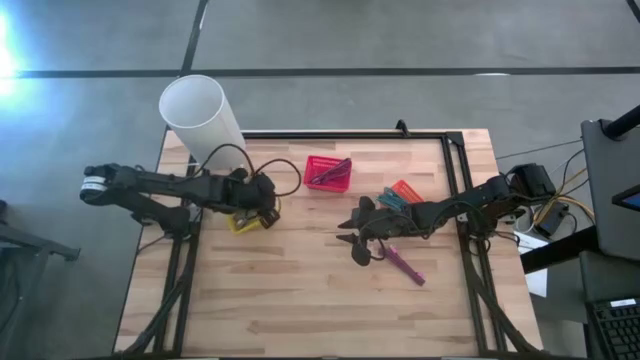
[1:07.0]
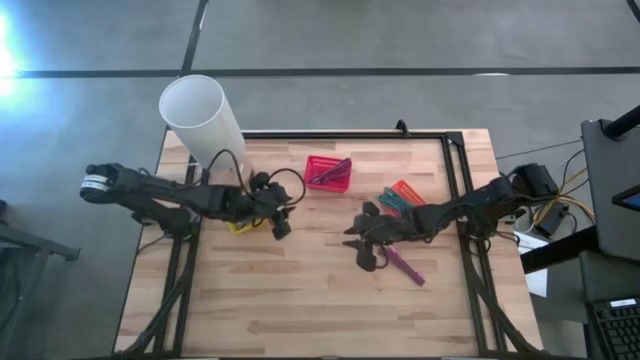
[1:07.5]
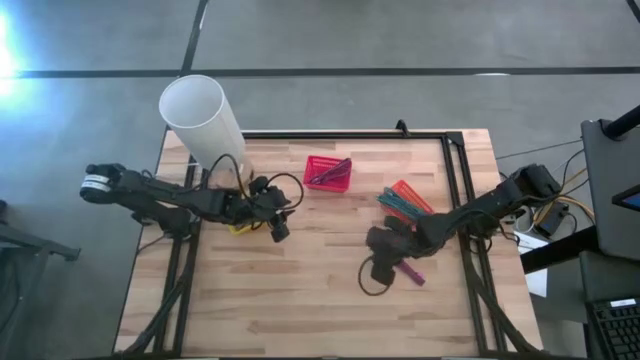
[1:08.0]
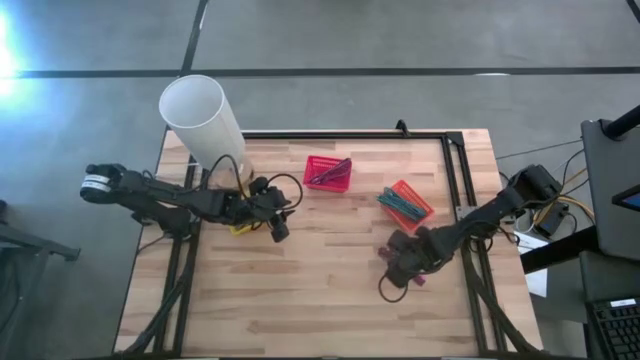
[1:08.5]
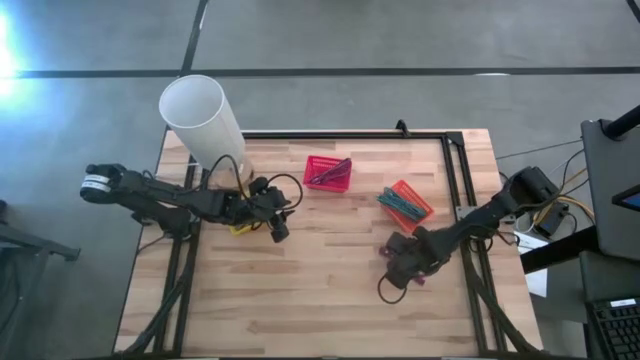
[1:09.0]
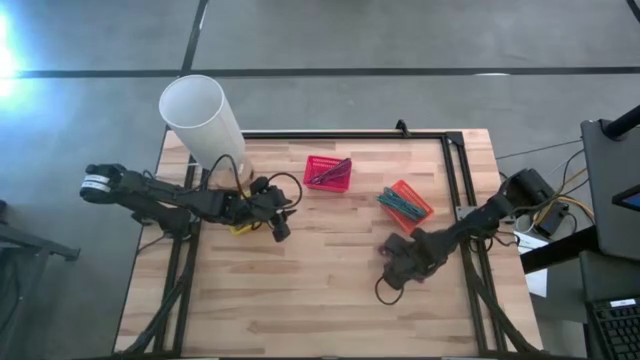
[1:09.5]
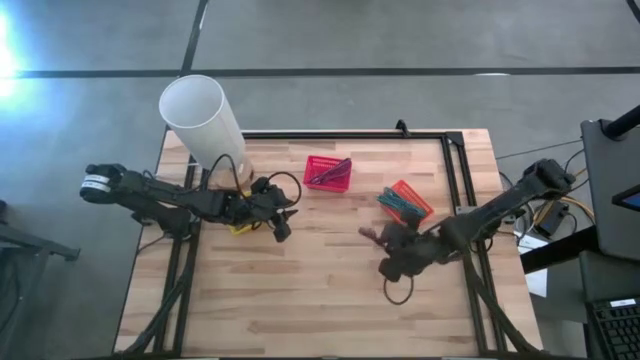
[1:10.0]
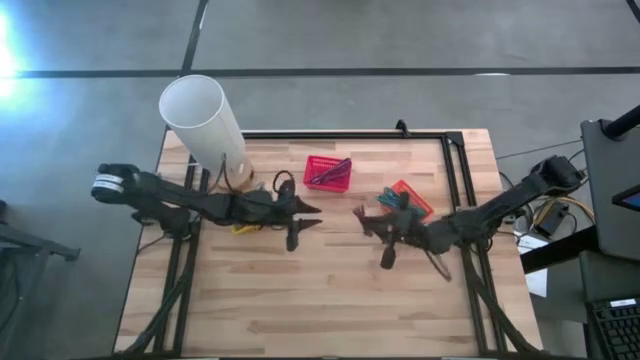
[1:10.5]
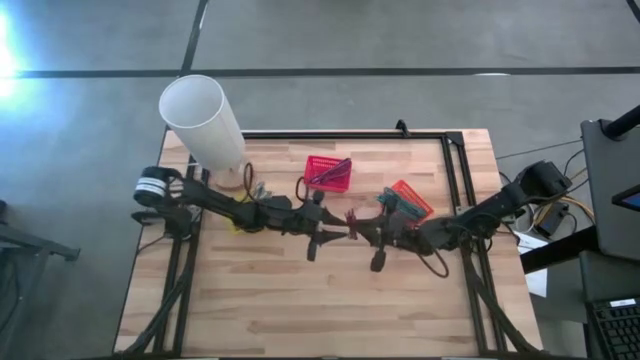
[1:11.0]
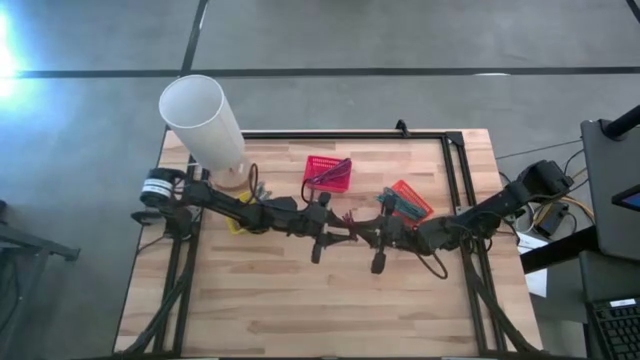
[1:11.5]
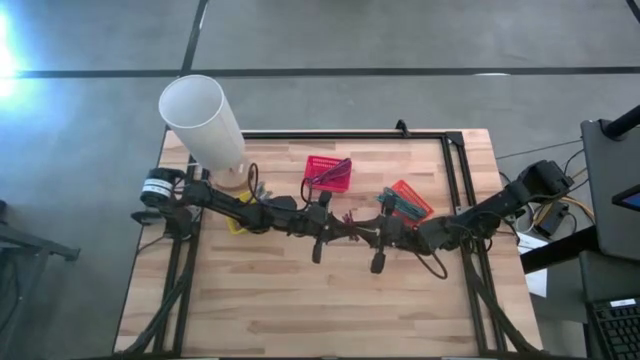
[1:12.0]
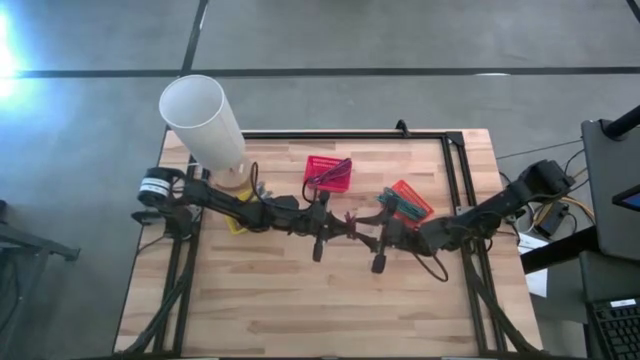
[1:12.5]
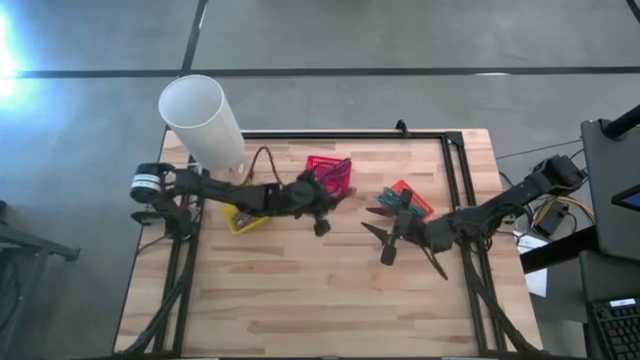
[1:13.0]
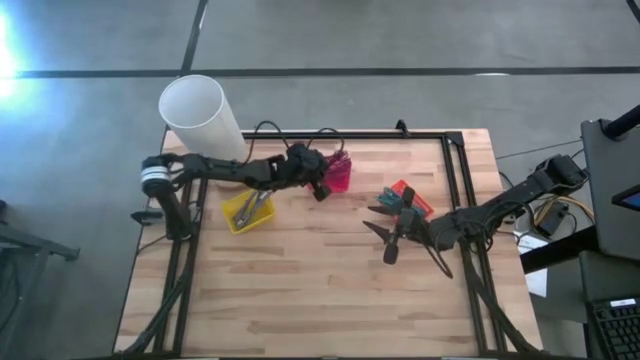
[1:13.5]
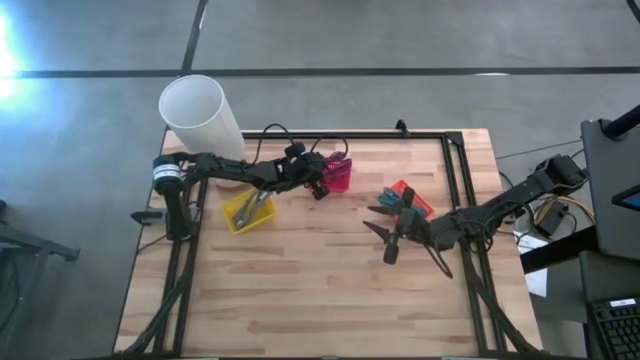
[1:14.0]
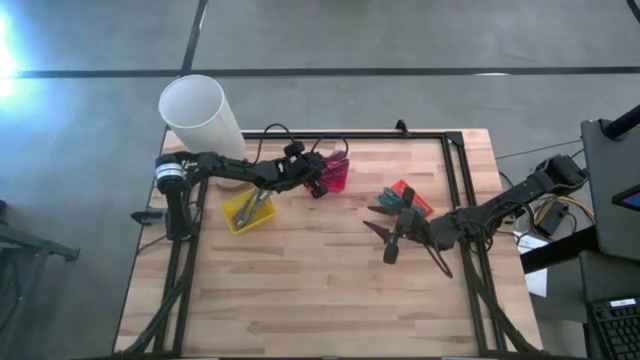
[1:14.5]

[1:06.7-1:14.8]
Task: Pick & Place USB Port
Put the pink charger cable into the red bin

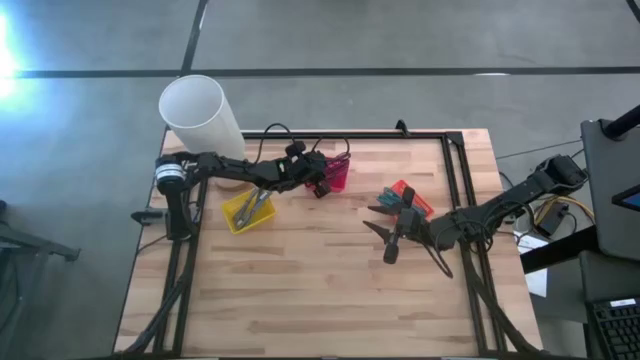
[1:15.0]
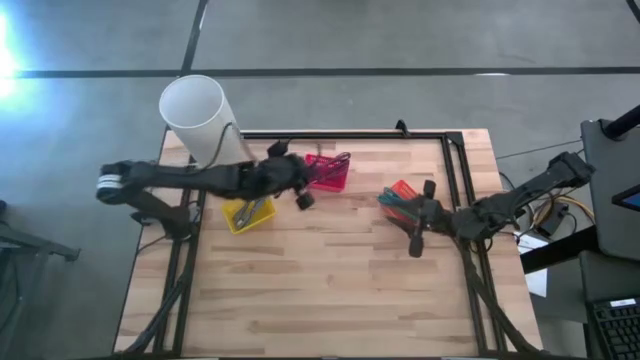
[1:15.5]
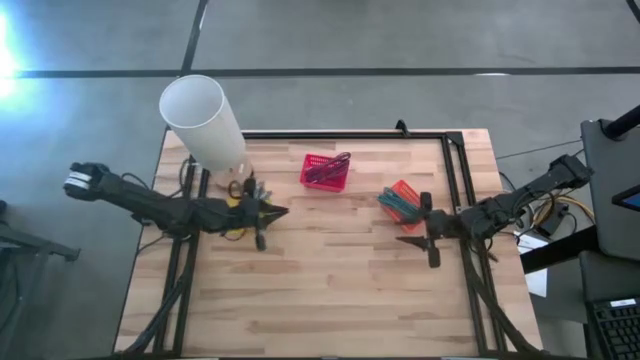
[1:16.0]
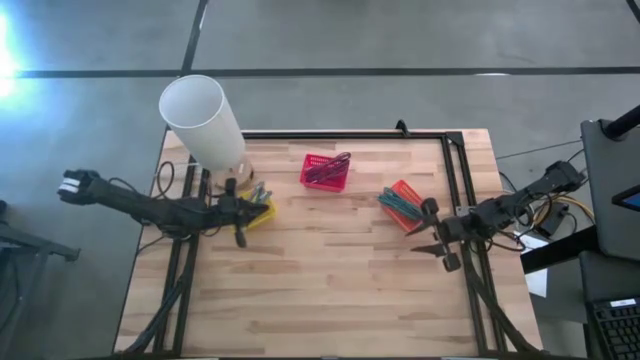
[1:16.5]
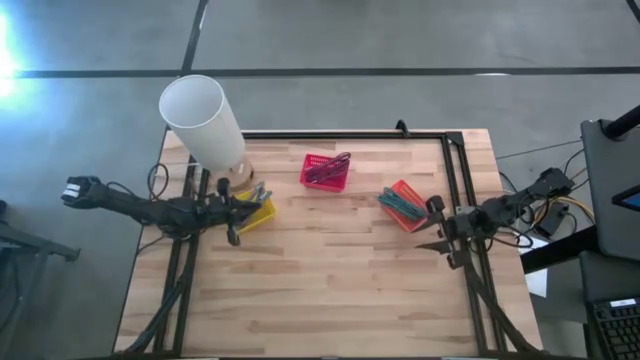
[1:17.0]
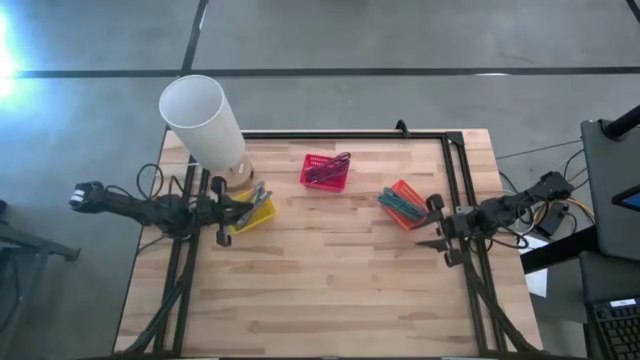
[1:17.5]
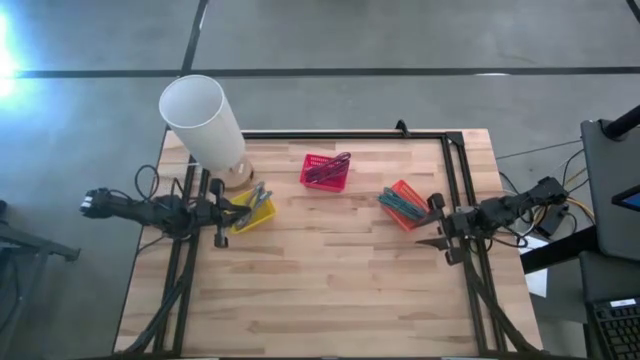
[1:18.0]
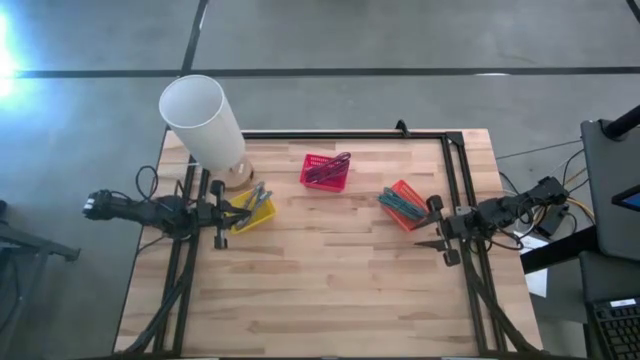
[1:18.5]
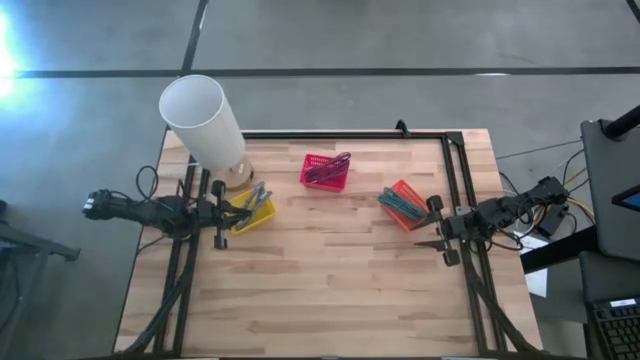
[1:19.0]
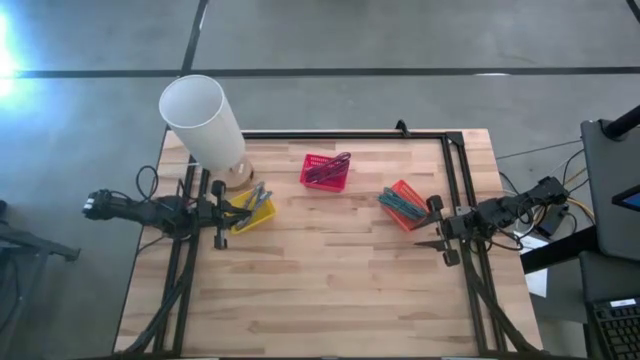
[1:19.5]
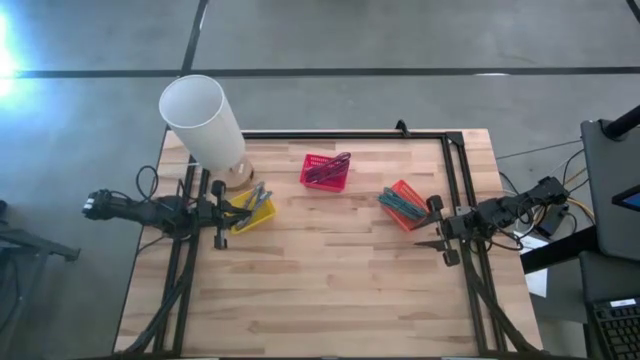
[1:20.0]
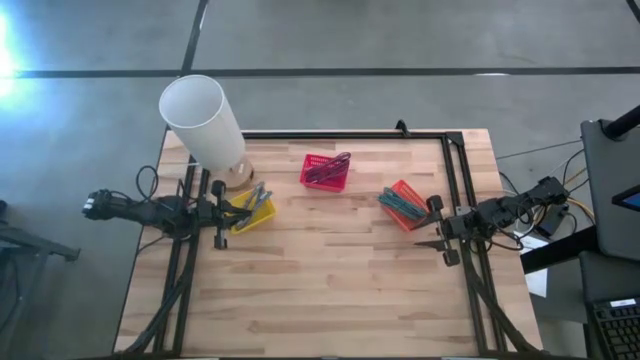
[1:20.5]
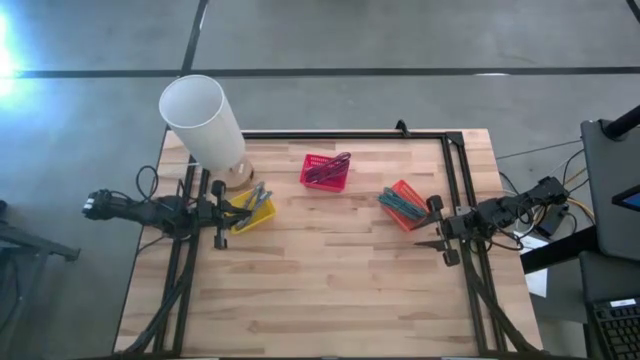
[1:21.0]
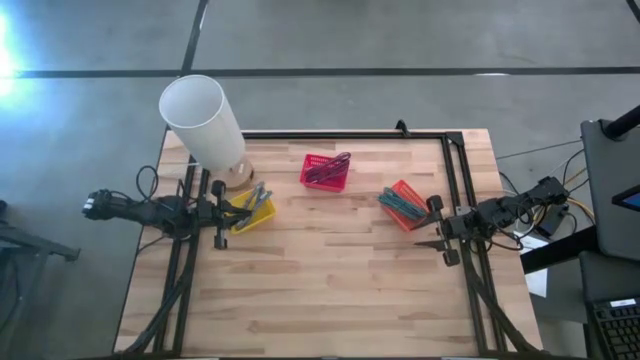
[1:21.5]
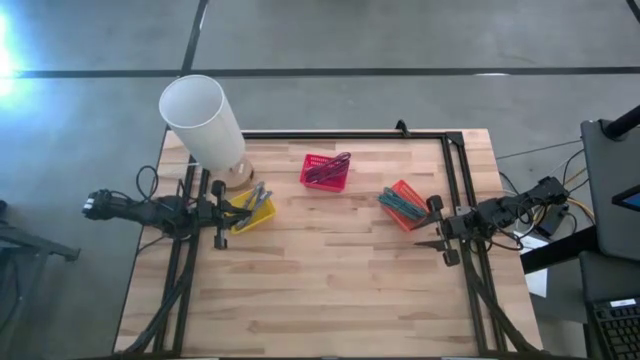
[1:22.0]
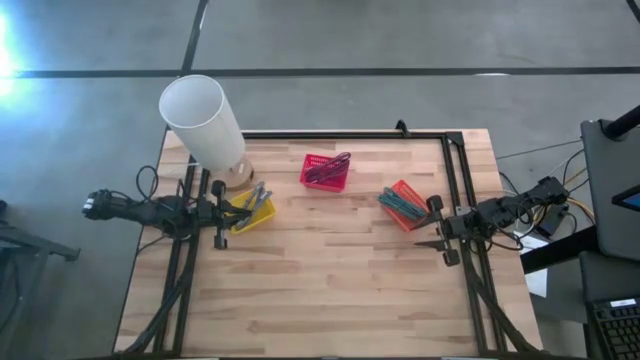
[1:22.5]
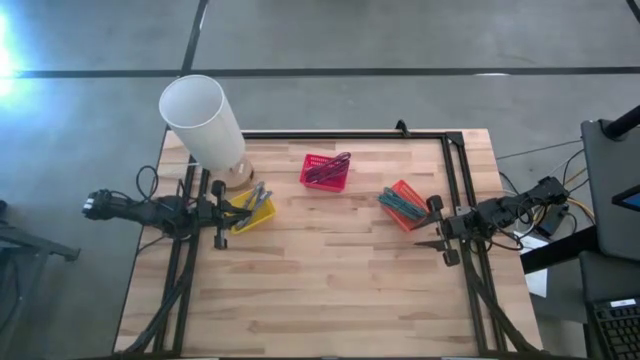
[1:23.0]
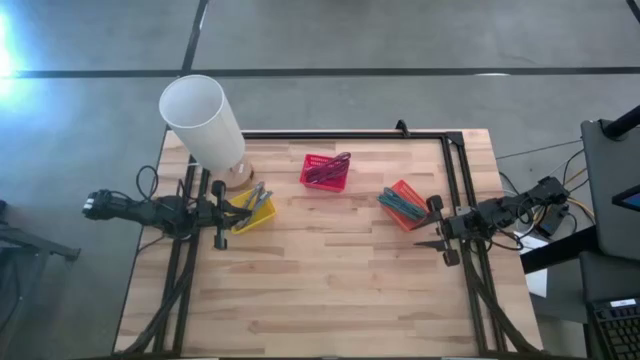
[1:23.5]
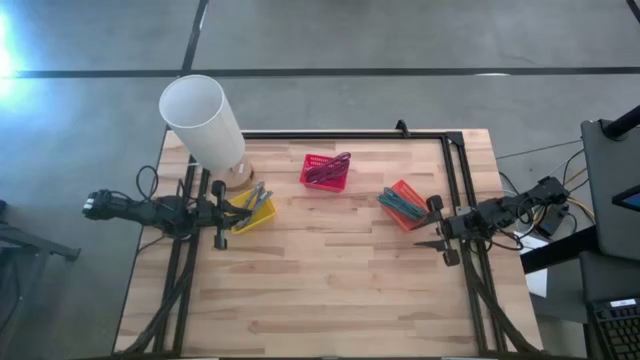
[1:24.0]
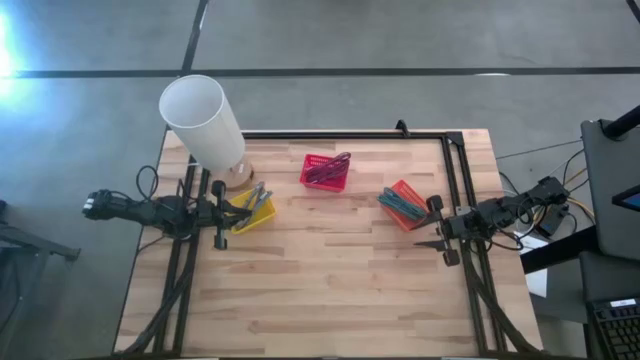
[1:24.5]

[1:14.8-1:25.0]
Return to Home Position

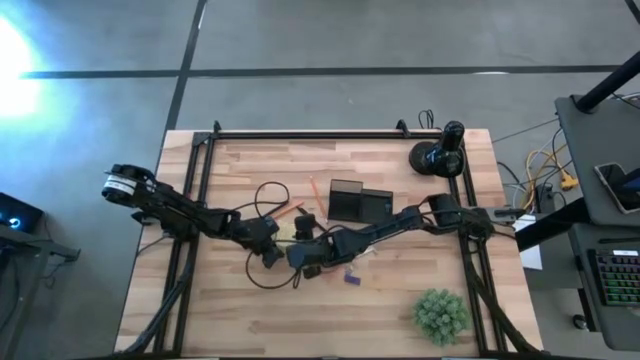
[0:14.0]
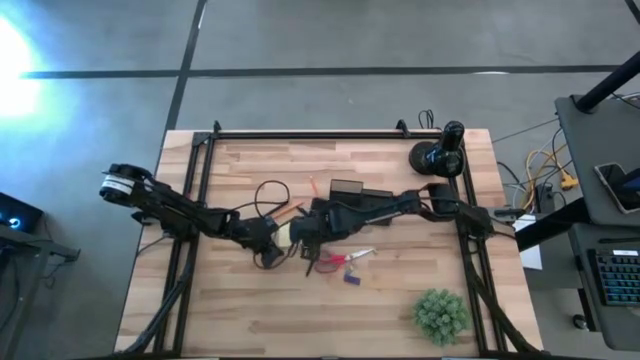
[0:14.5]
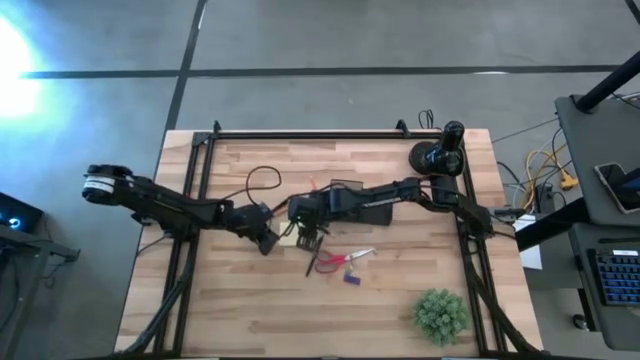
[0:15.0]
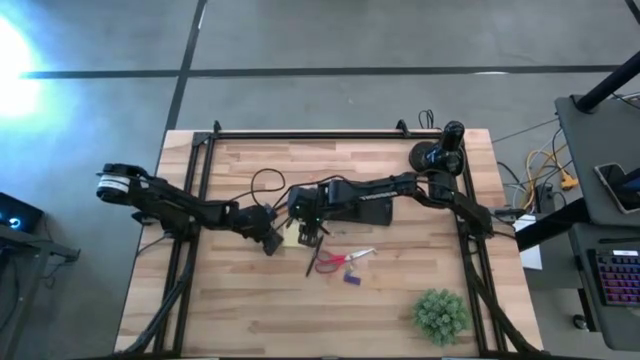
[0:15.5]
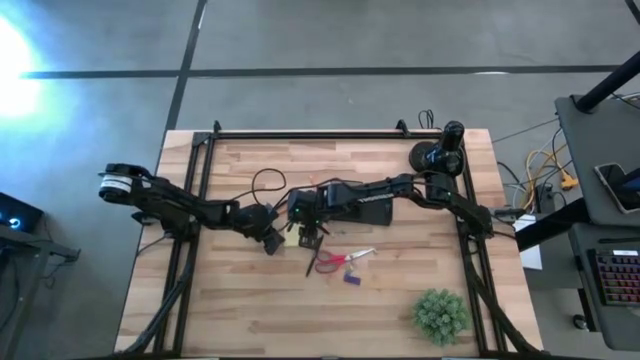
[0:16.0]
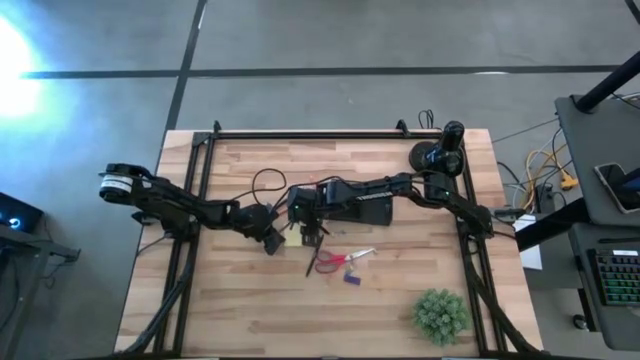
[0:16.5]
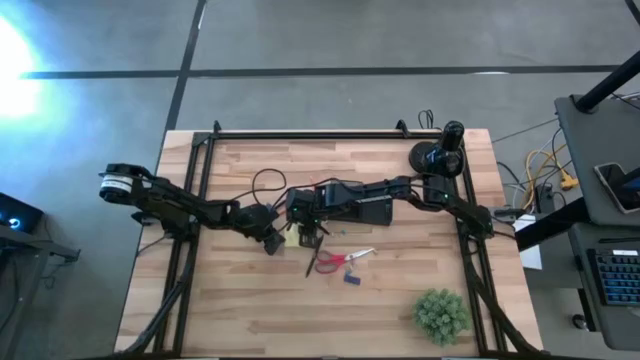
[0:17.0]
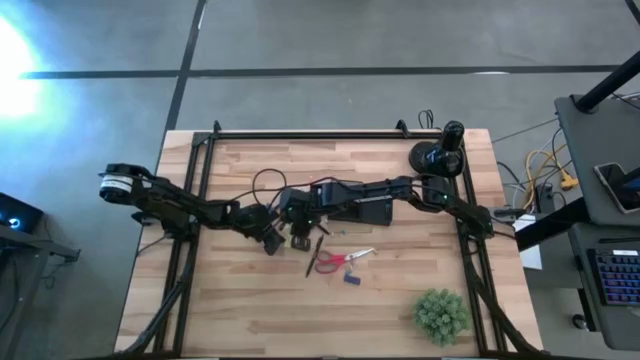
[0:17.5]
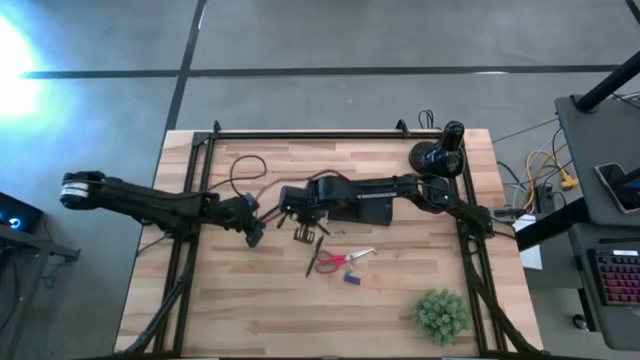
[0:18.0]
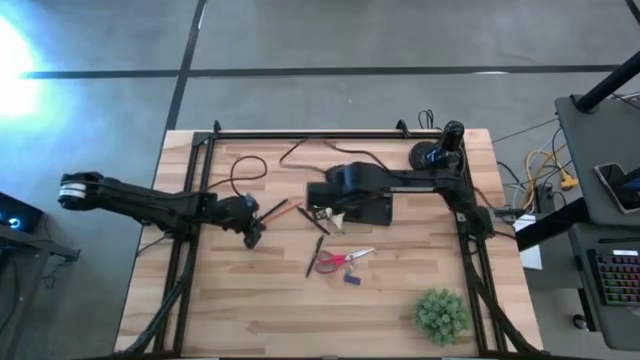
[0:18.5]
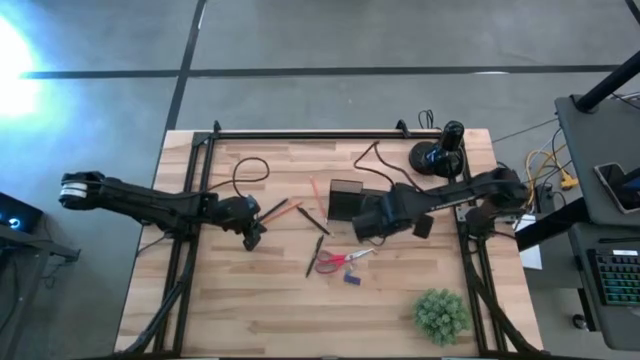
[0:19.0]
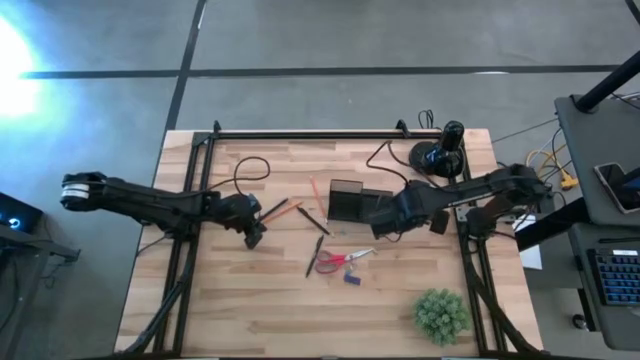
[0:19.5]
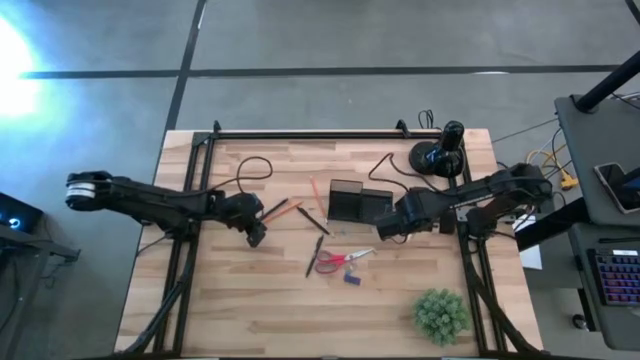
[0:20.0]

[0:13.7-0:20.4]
Task: Pick and place office supplies into organizer
Move the sticky note to the middle right of the table
